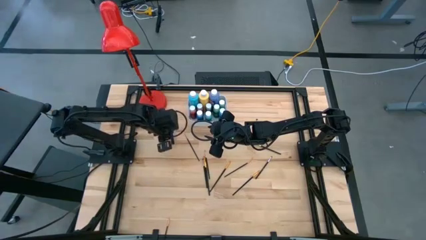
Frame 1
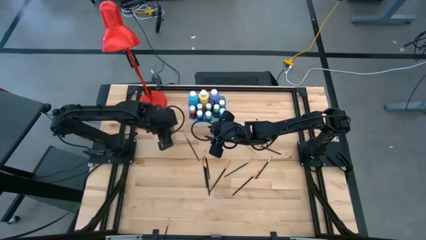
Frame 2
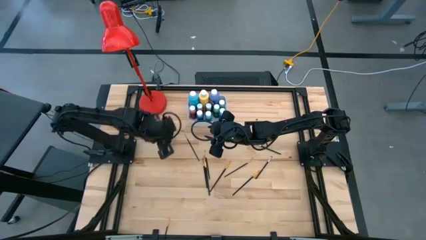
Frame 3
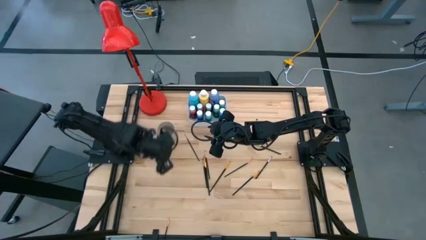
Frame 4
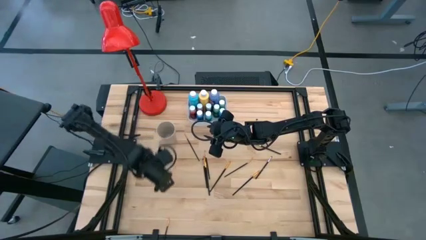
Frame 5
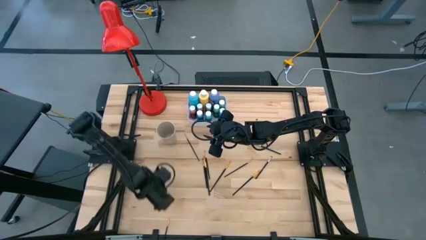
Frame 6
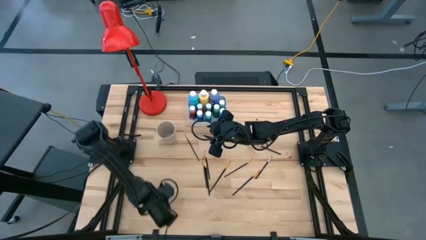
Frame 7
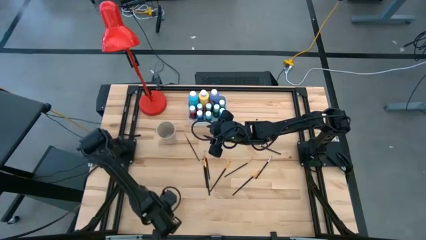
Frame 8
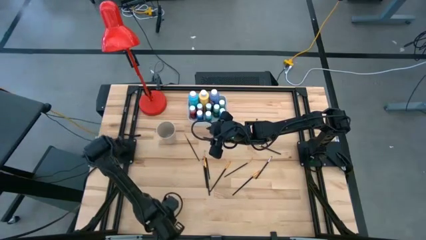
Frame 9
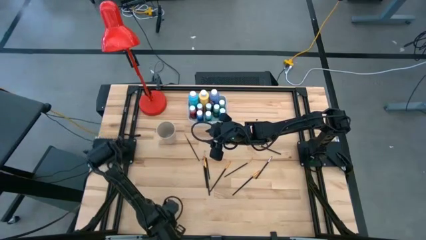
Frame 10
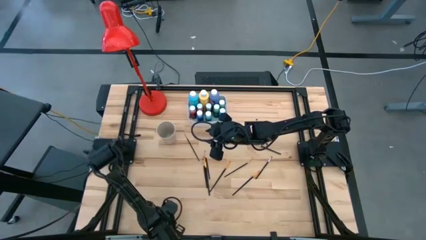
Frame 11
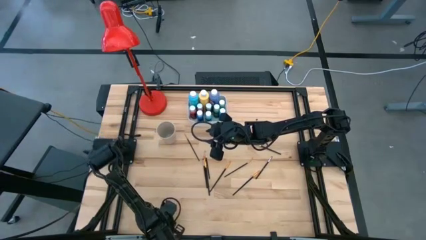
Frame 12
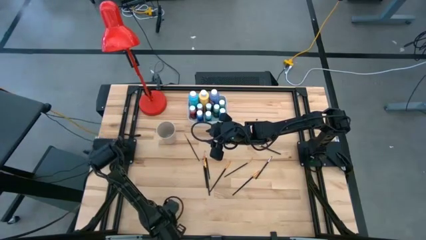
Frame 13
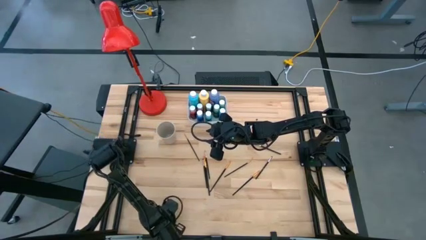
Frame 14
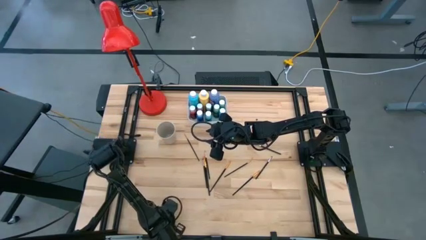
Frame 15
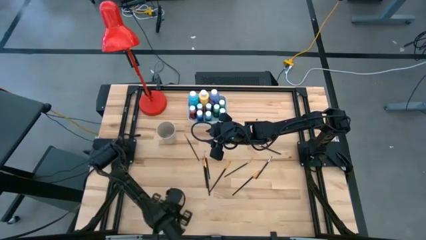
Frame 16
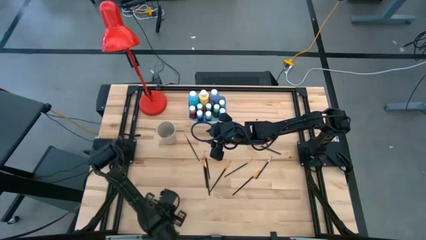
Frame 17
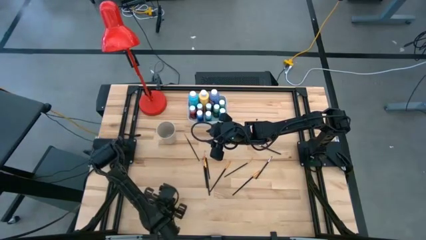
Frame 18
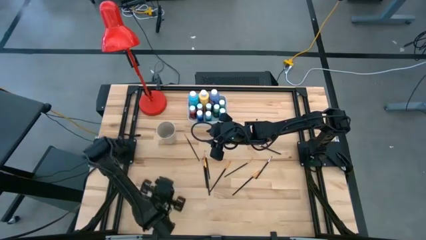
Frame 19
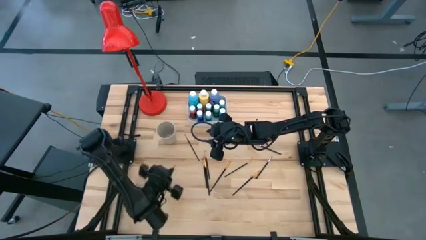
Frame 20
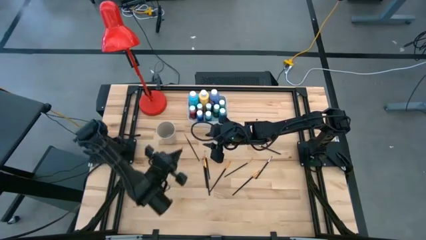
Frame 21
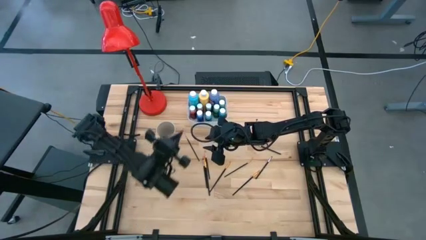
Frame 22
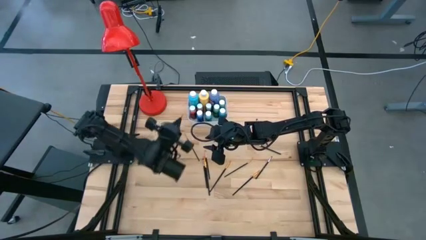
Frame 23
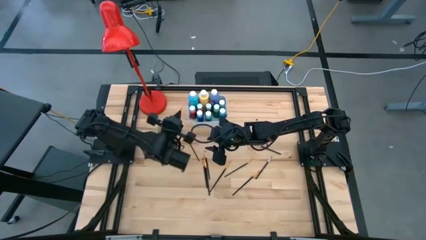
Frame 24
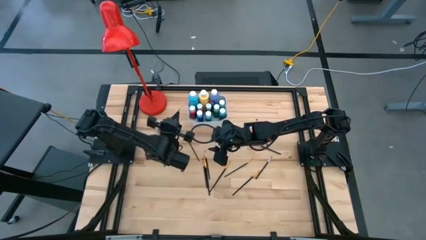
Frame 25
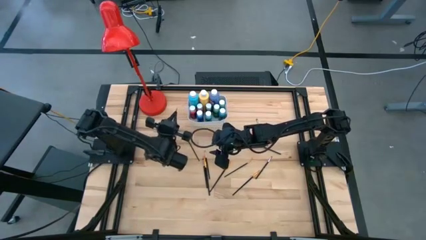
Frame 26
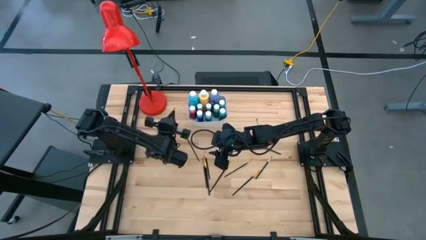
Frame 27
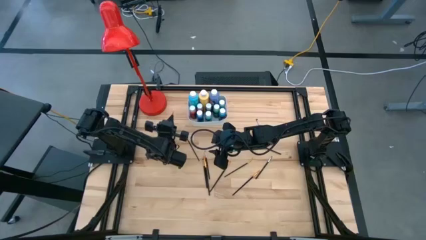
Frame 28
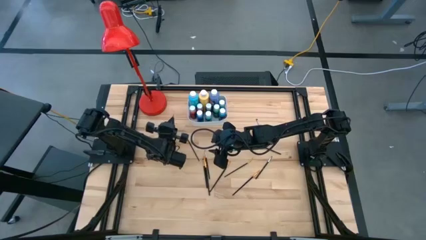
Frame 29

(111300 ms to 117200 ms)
Task: Pick & Place Paint Supplies
Put the black paint brush into the white cup

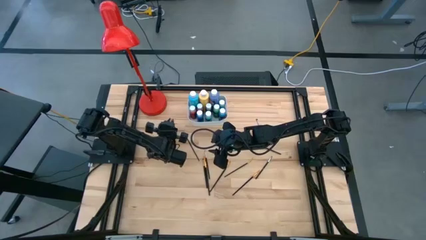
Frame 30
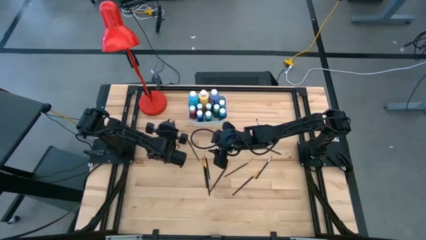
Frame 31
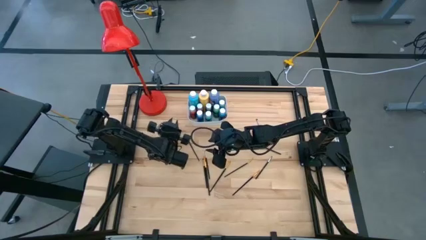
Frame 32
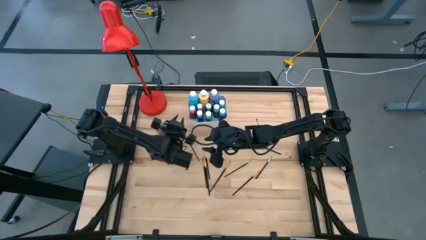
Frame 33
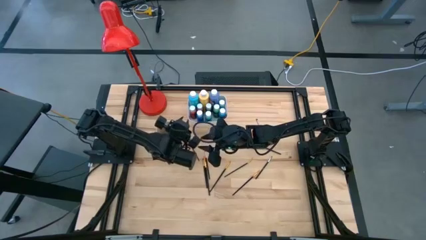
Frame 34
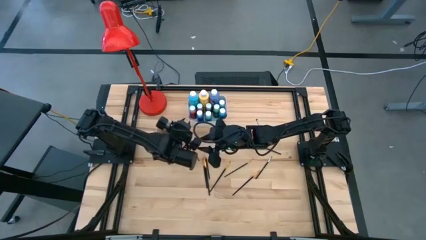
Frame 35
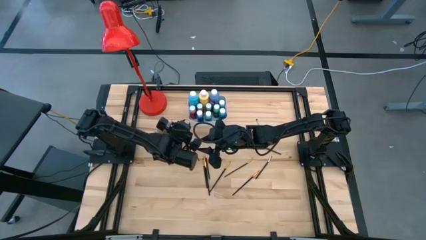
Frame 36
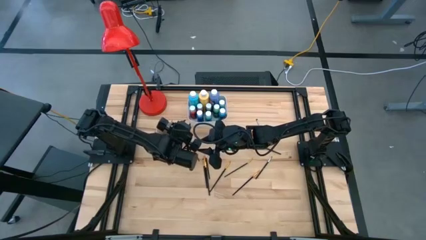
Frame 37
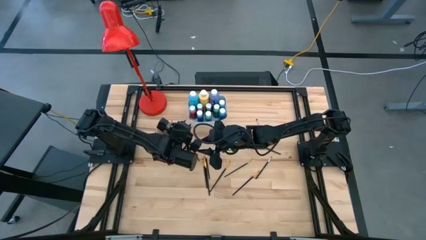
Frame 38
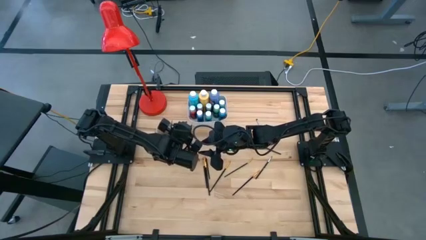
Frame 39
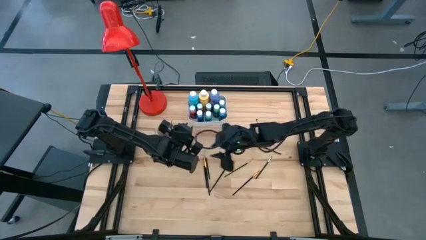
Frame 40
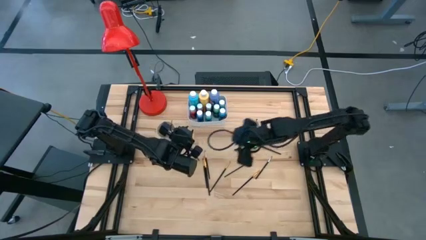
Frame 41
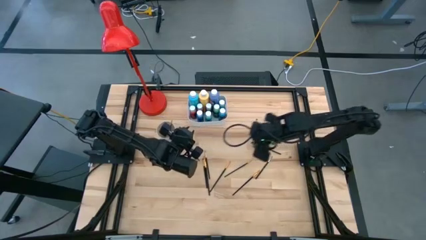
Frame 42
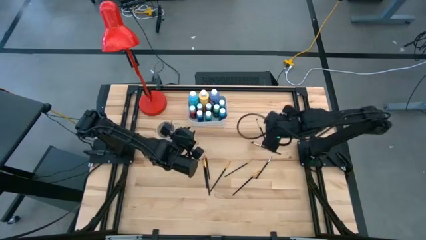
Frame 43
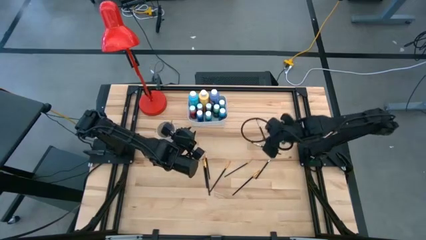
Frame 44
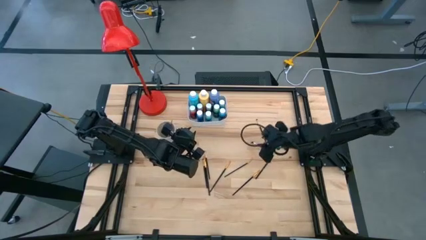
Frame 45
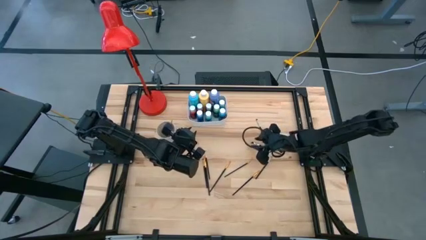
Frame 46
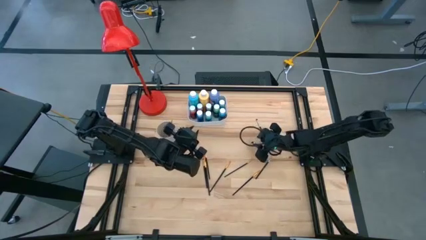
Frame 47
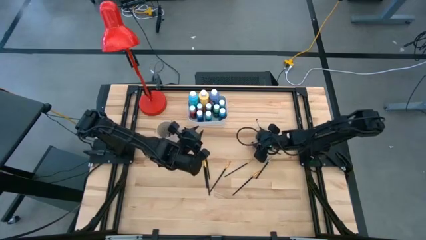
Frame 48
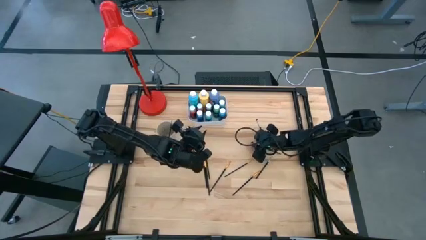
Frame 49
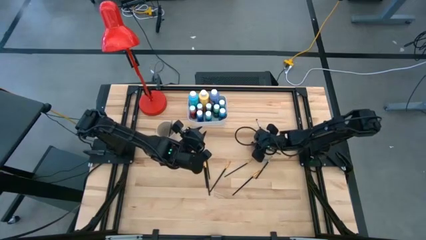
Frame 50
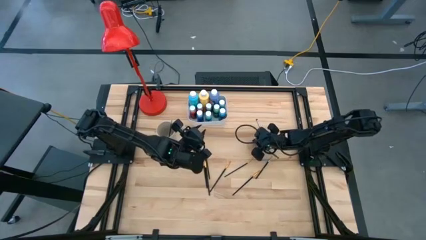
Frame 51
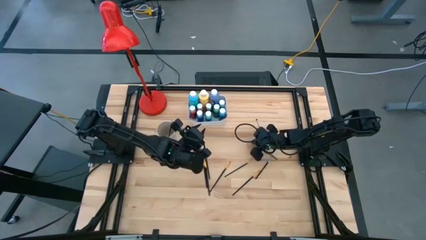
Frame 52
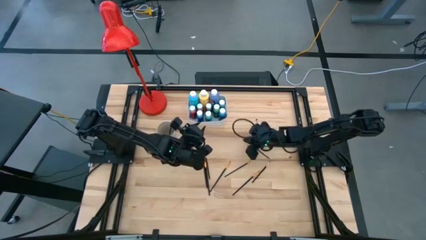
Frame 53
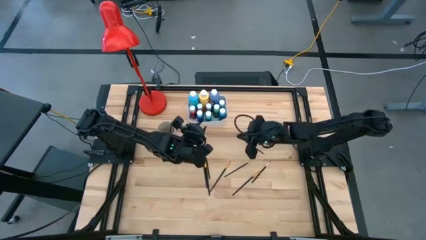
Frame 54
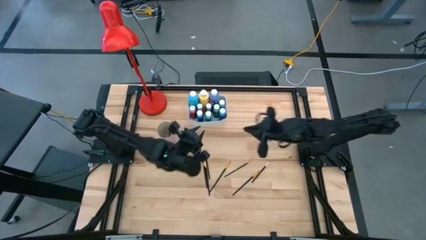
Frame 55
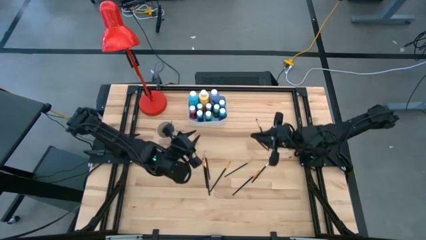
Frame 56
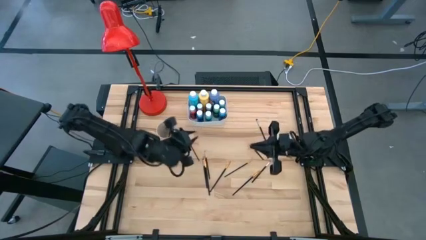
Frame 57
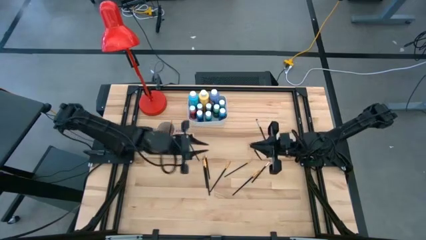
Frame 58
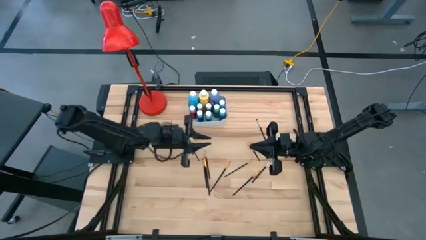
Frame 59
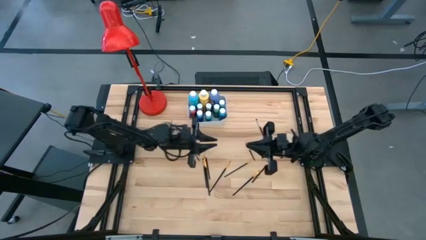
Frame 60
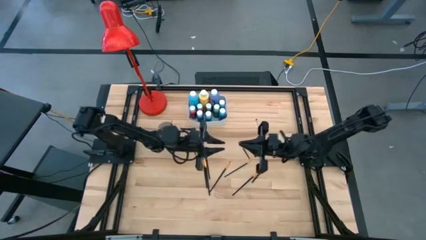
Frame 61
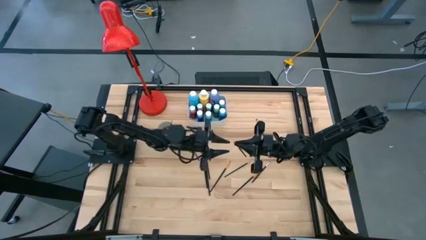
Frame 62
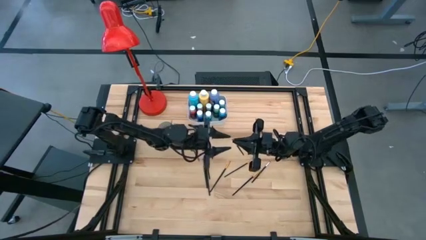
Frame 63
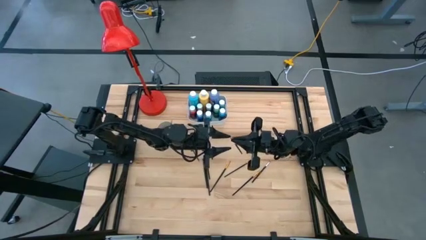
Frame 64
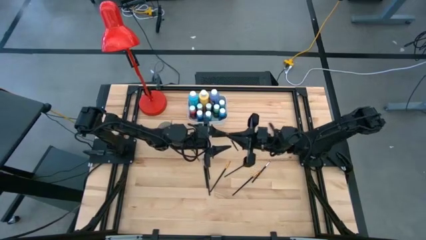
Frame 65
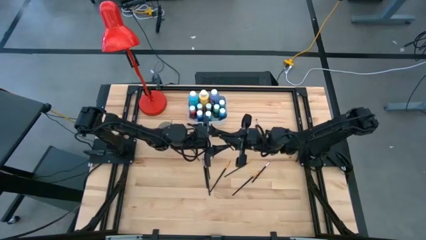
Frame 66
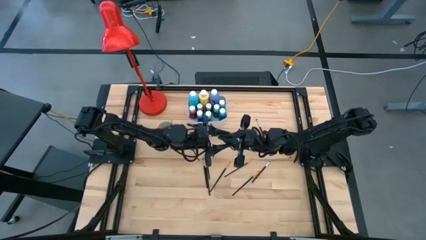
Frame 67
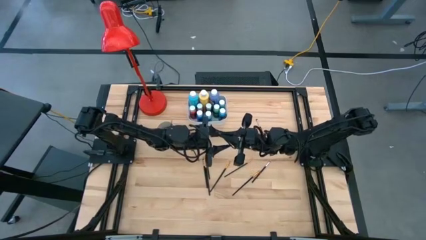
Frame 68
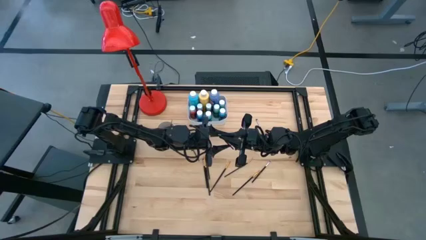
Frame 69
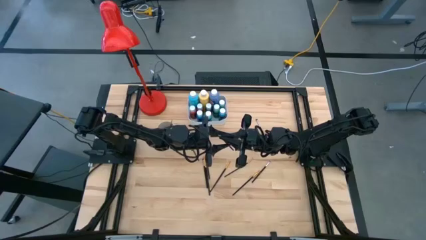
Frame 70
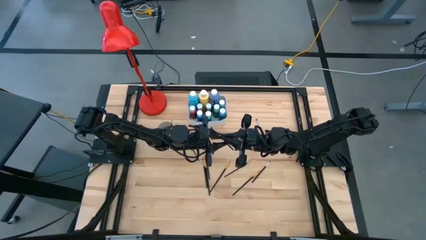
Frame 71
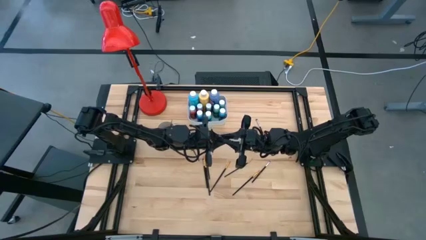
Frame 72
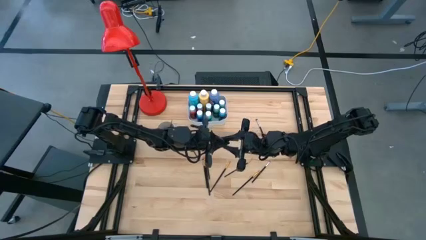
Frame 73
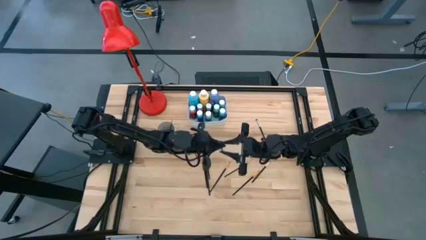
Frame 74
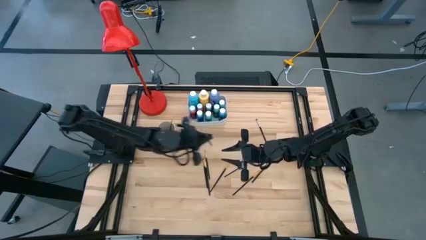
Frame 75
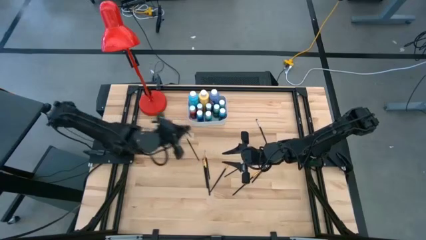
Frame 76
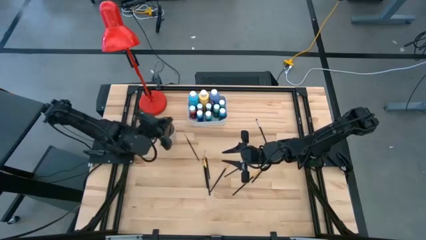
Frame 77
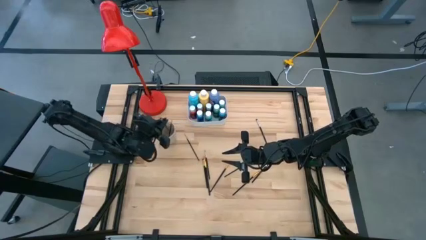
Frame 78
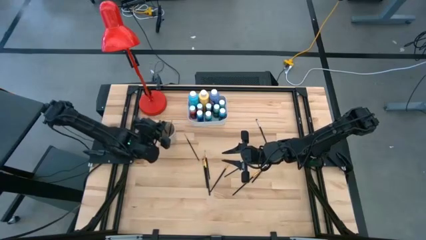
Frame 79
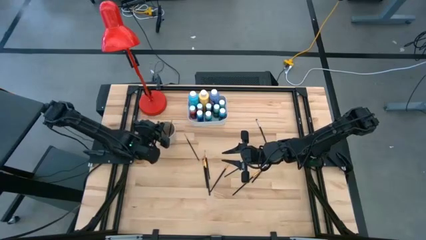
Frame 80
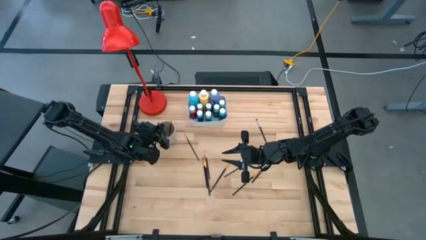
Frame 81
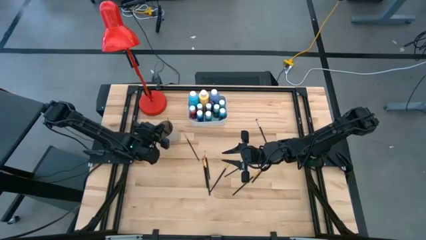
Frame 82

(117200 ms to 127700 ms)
Put the black paint brush into the white cup
